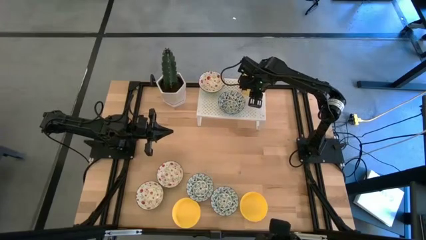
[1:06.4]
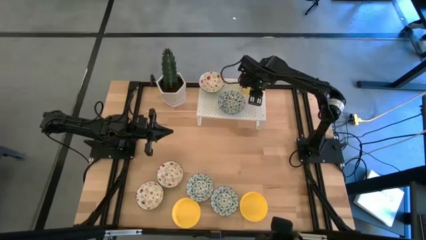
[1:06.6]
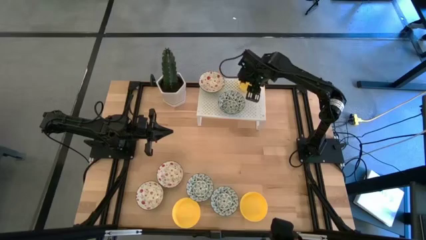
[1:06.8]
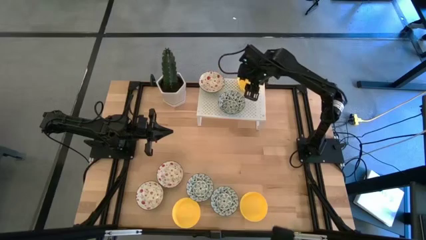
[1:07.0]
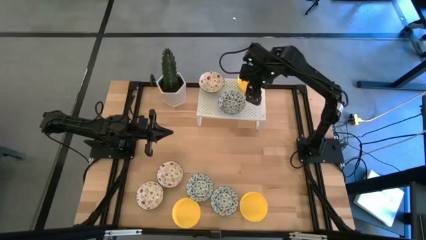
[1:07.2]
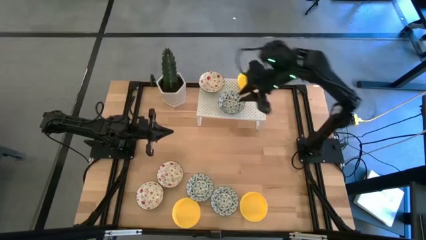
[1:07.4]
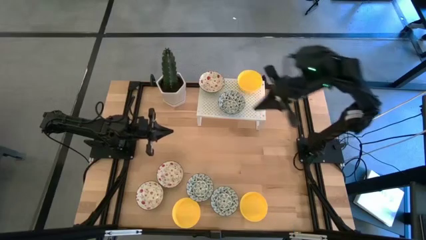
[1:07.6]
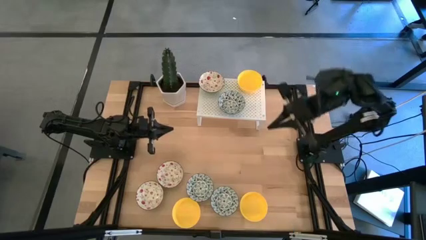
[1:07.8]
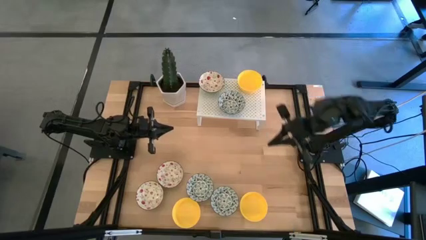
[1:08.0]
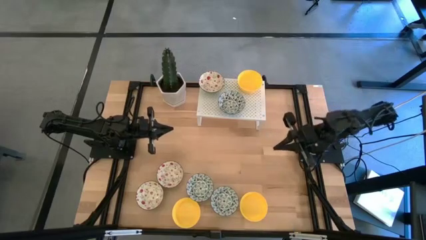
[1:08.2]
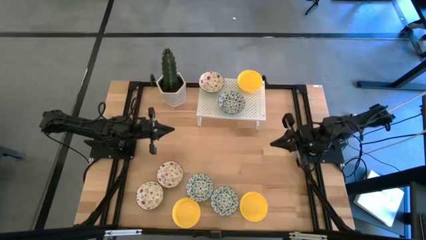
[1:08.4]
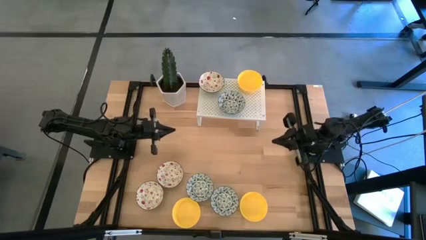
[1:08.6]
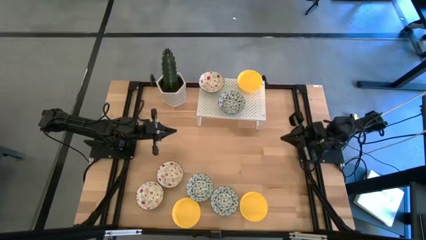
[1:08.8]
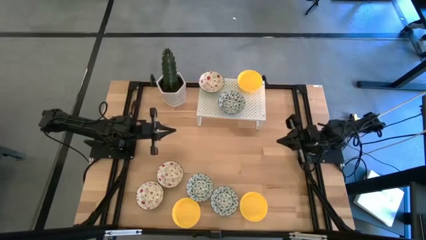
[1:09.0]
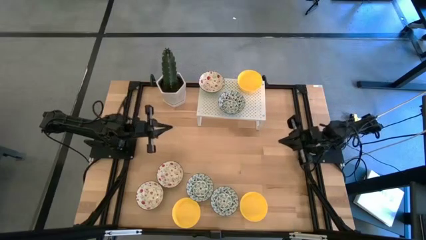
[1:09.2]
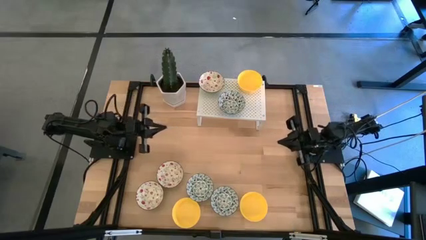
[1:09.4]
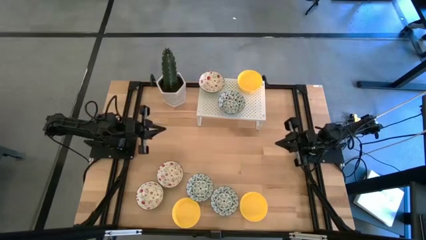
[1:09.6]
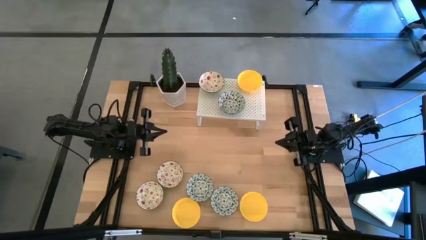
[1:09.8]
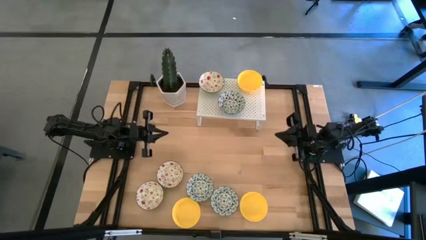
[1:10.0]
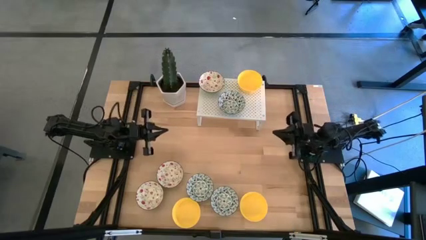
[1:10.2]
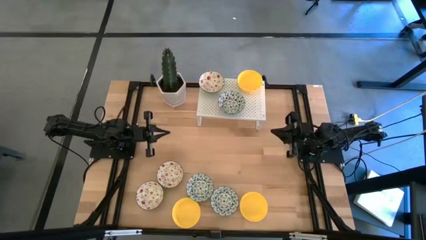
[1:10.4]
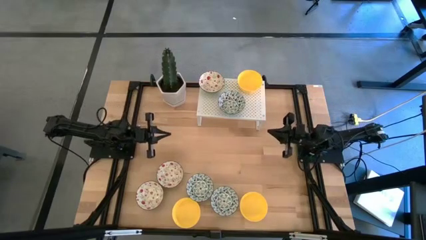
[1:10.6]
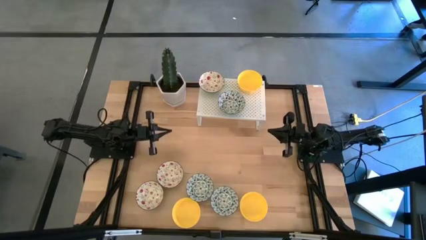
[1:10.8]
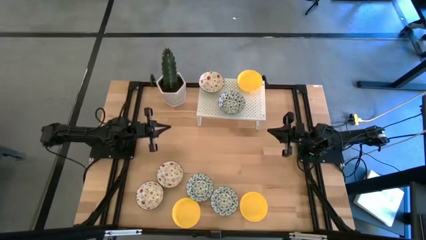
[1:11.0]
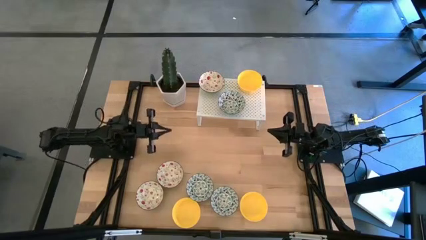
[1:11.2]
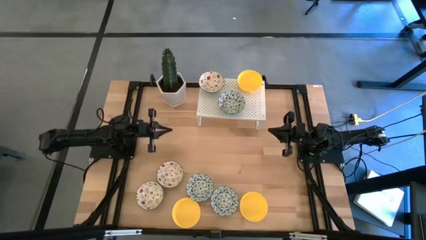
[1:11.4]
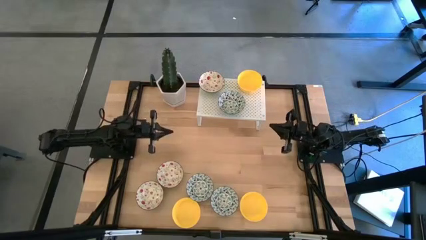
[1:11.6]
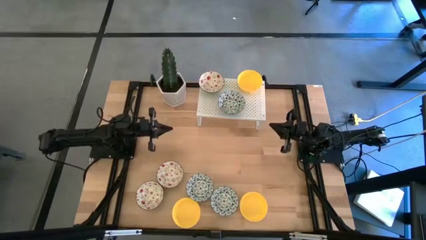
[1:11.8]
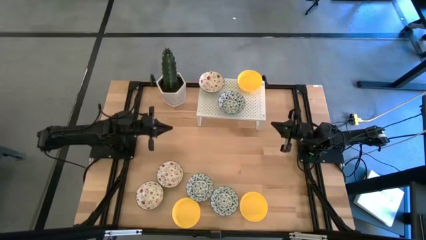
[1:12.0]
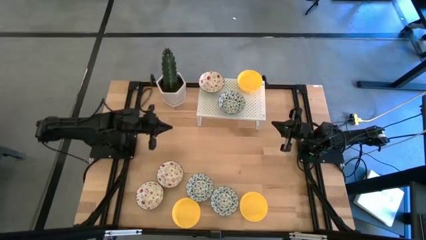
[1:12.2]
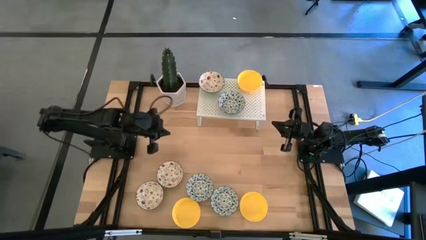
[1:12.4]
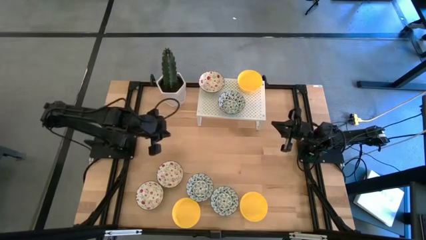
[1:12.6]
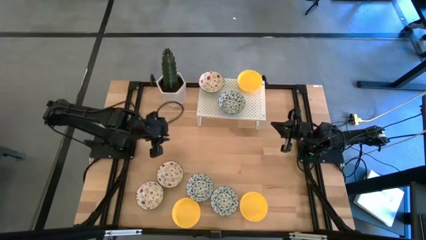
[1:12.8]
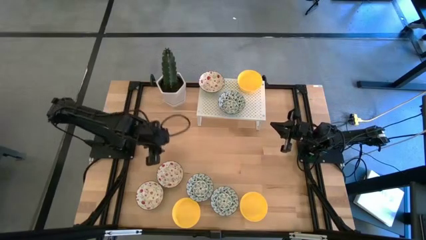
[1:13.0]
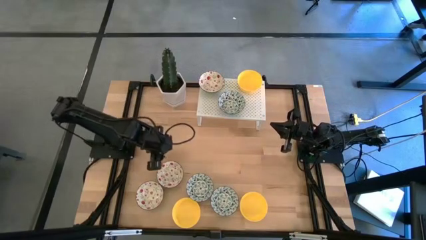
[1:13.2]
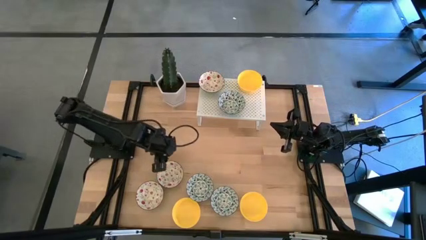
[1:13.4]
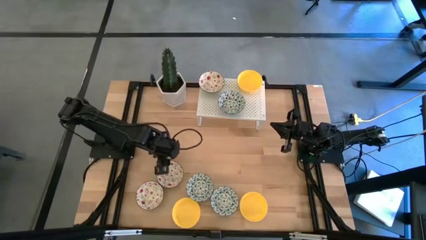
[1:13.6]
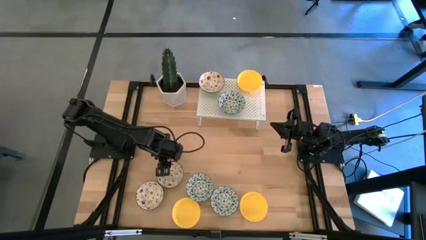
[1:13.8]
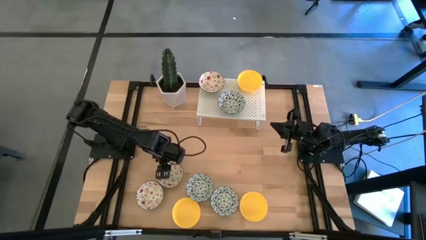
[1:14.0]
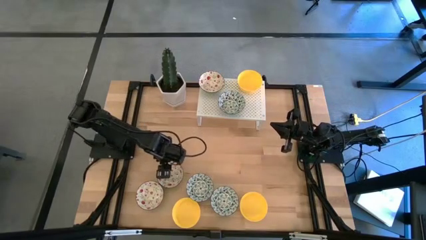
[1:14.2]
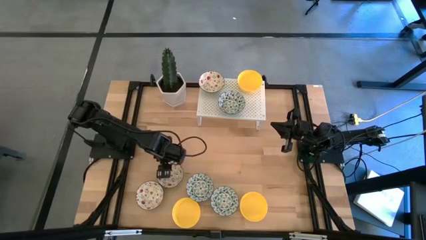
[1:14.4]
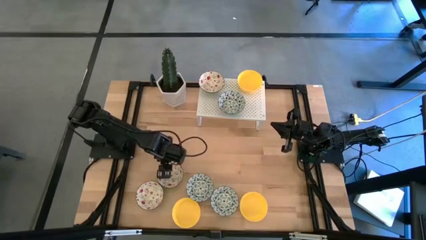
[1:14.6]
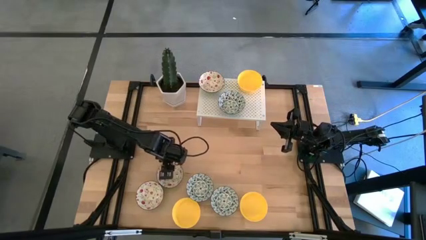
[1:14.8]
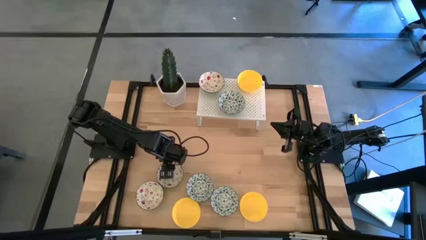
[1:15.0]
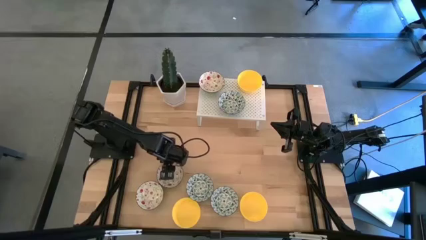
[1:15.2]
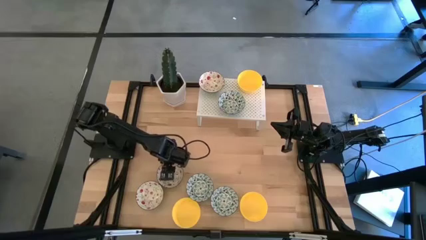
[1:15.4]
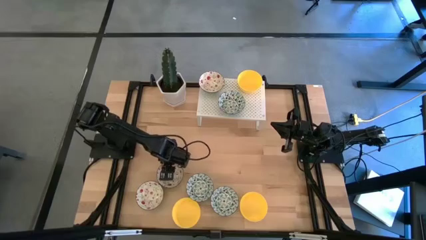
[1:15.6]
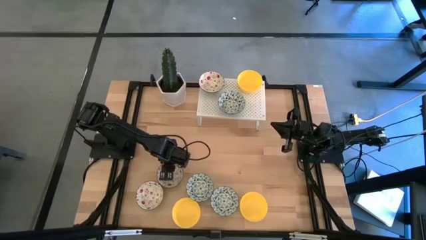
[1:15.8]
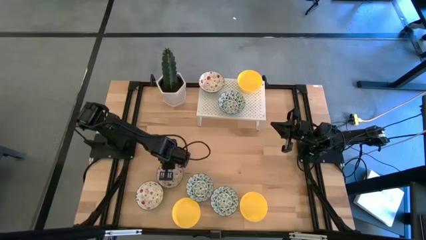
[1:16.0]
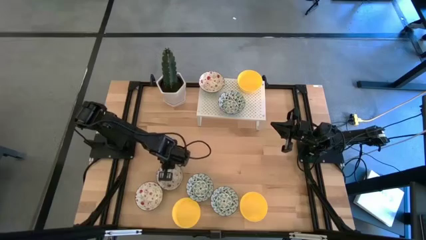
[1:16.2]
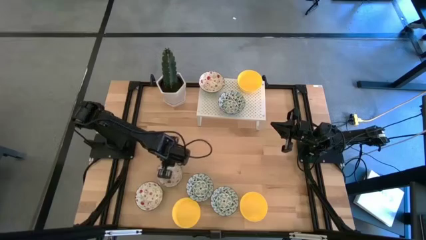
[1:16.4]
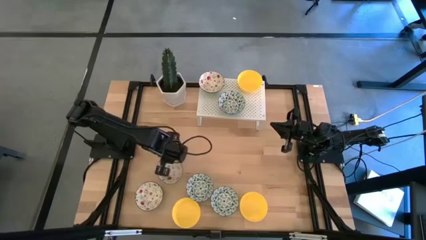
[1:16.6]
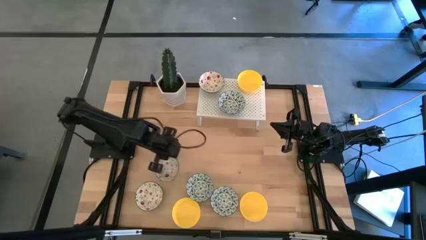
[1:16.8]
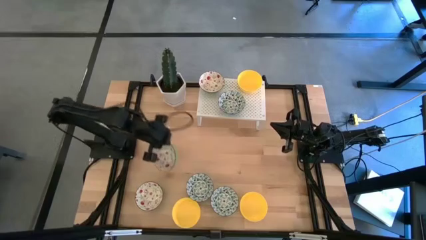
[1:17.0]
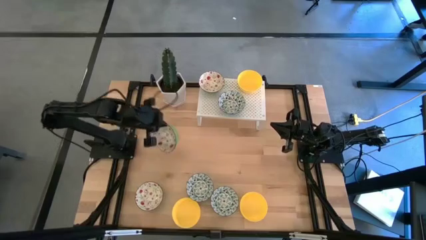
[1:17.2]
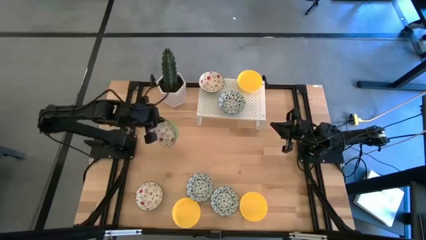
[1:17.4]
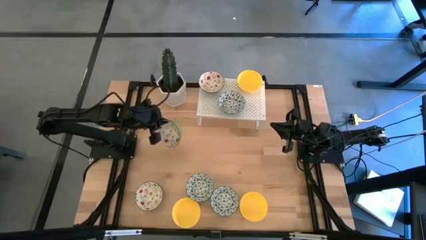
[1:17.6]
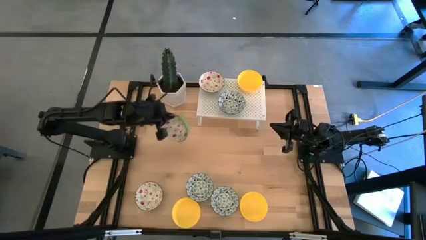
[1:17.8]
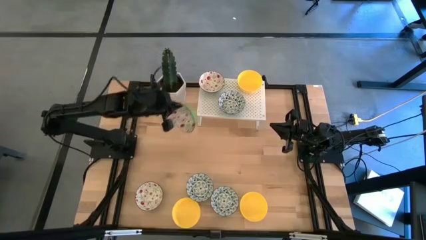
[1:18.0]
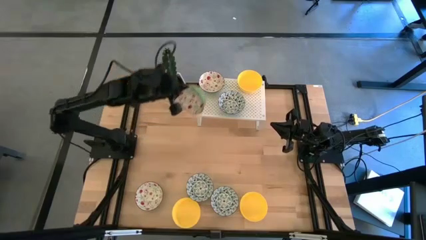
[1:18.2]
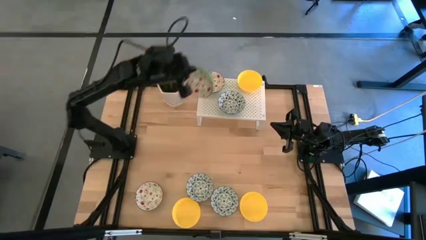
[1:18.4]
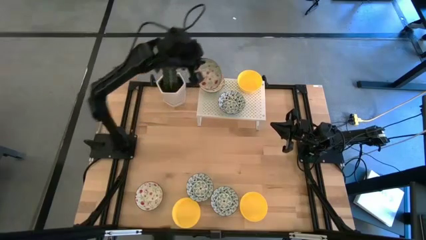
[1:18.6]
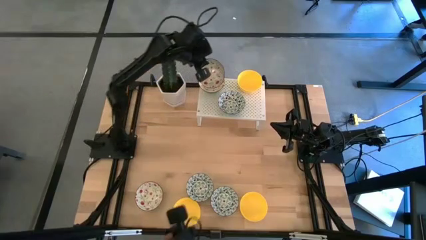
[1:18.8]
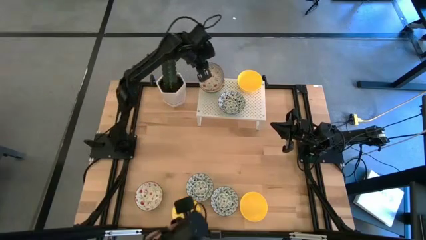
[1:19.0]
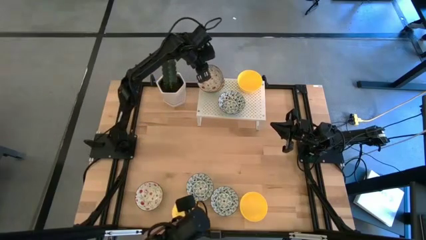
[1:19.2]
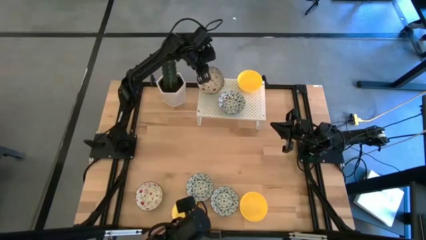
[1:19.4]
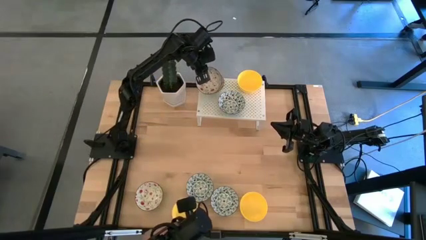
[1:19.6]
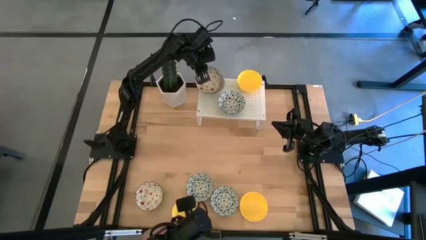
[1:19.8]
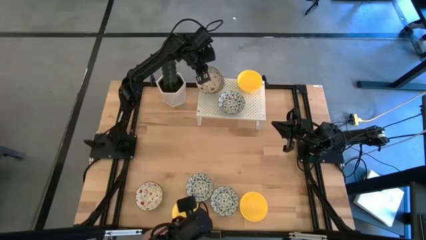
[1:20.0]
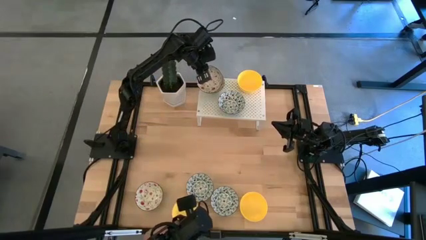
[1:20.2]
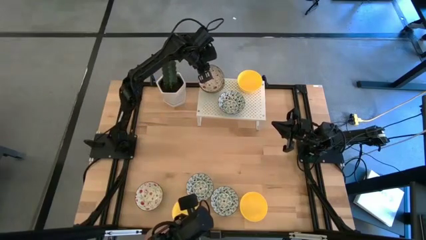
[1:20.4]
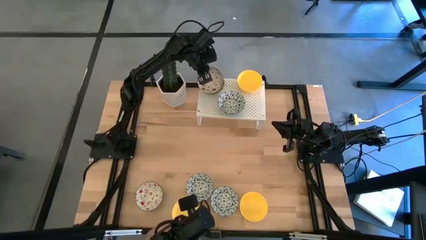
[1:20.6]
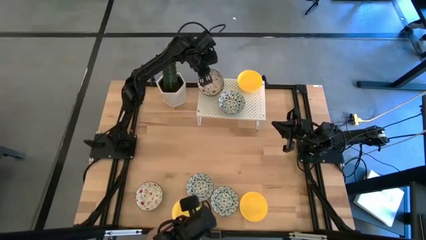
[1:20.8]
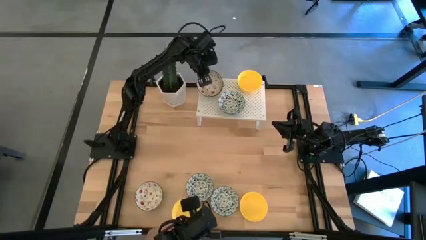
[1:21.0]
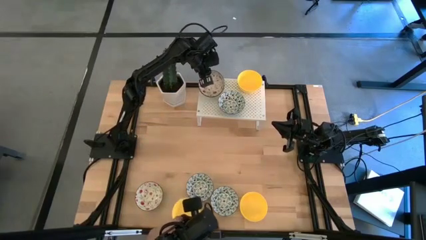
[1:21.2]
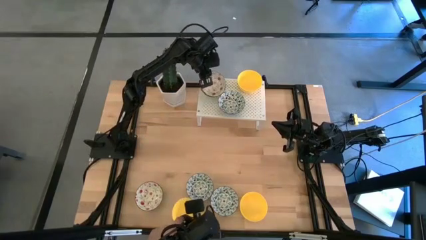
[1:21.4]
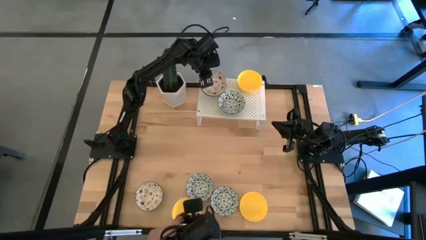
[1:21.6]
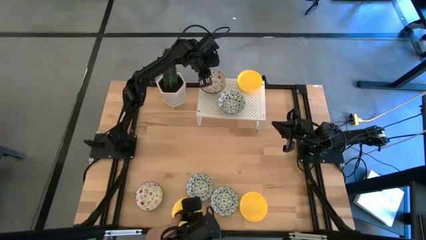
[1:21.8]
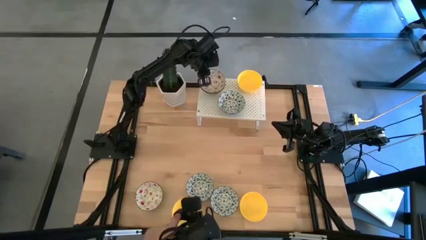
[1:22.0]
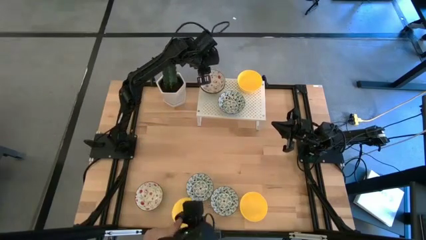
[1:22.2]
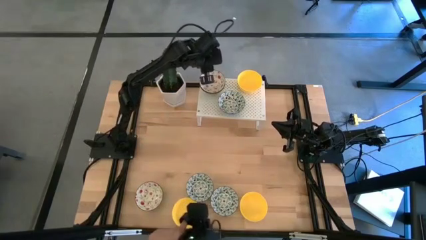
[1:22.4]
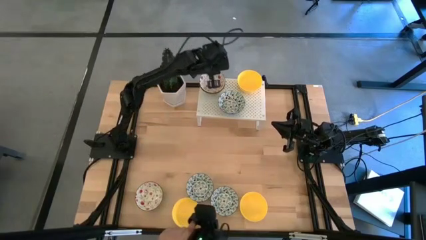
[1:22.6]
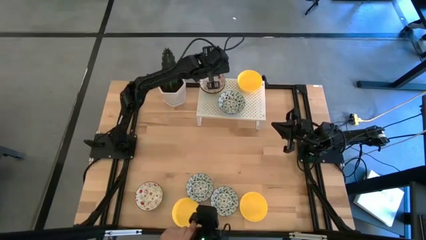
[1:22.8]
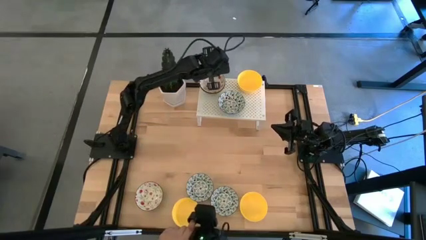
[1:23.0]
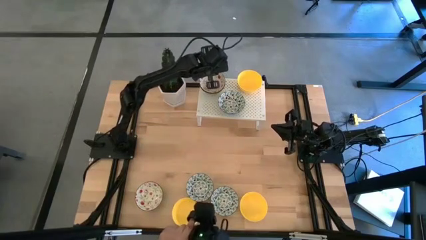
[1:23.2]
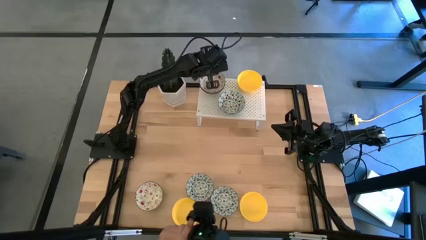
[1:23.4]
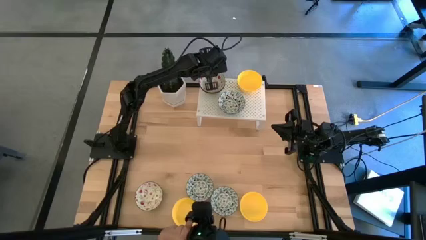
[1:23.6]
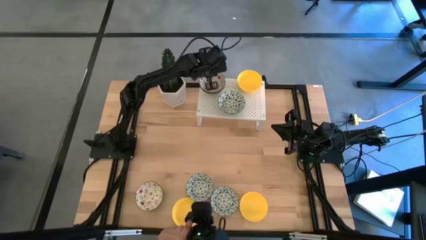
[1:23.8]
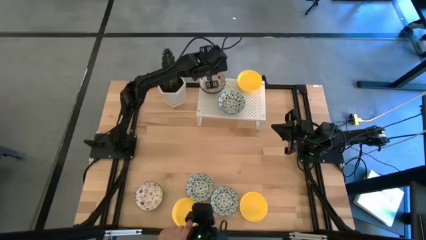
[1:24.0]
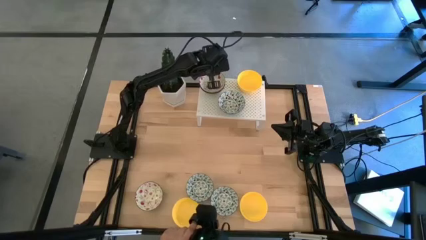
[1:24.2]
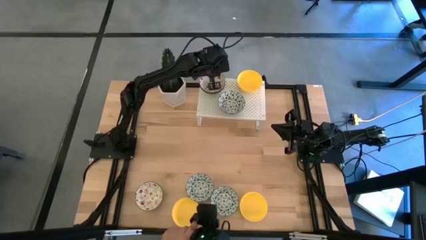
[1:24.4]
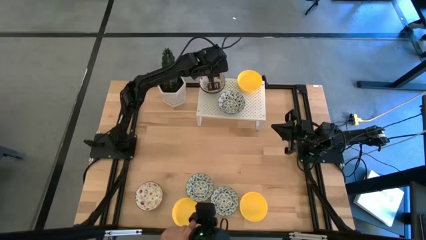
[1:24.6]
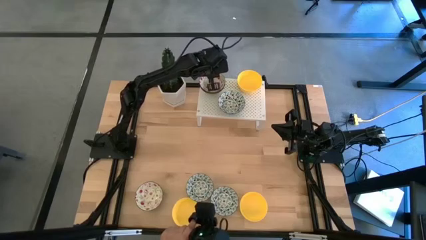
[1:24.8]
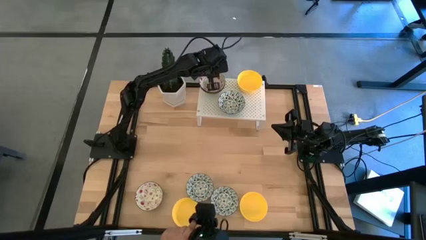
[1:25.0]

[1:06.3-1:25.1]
Task: Pick & Place Mini bowls
Stack the top red patterned bowl on the red patterned bowl on the shelf
